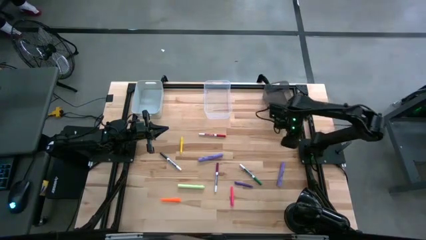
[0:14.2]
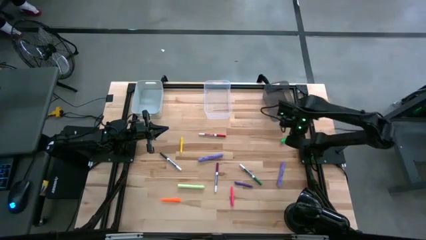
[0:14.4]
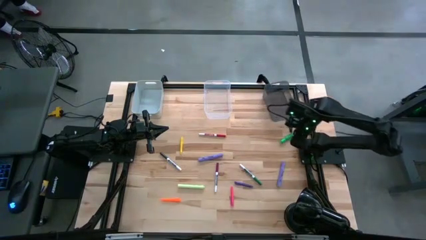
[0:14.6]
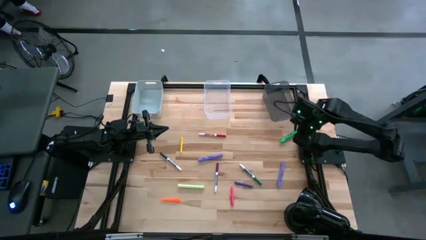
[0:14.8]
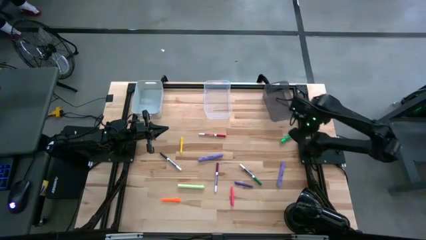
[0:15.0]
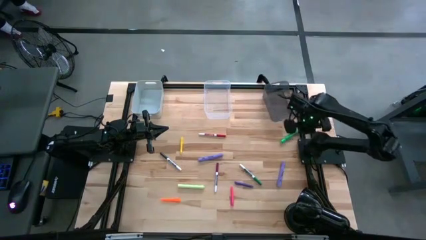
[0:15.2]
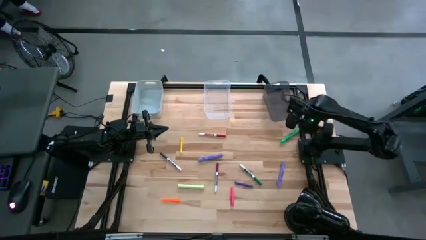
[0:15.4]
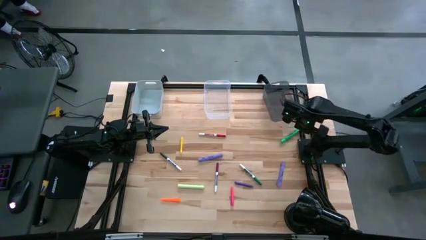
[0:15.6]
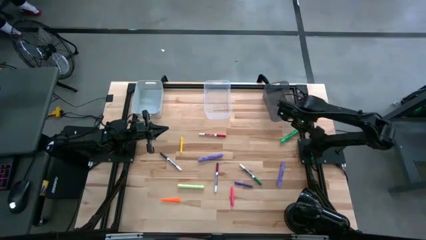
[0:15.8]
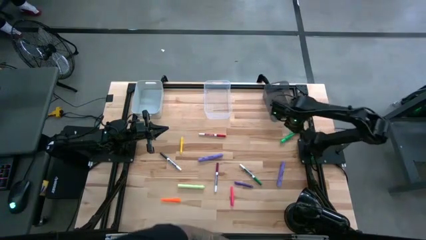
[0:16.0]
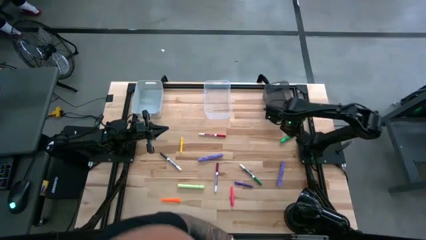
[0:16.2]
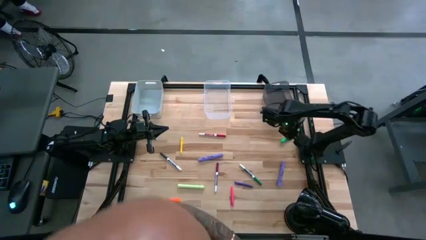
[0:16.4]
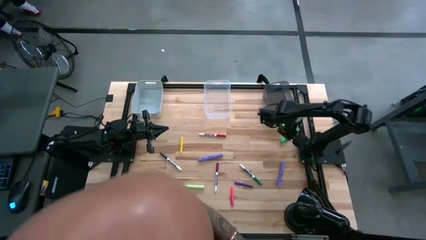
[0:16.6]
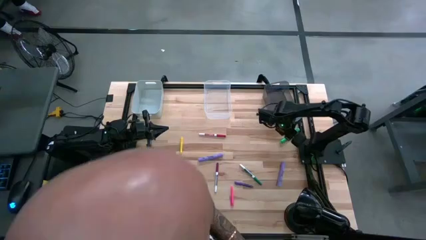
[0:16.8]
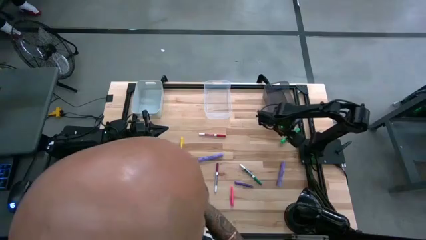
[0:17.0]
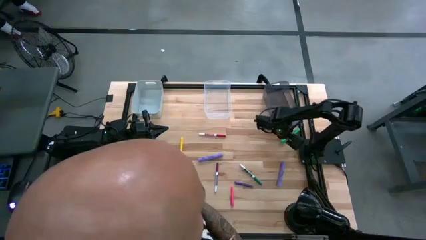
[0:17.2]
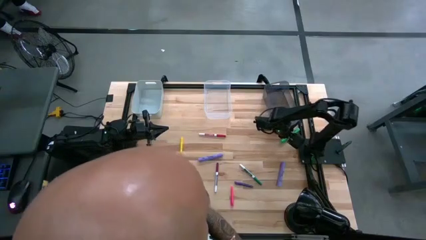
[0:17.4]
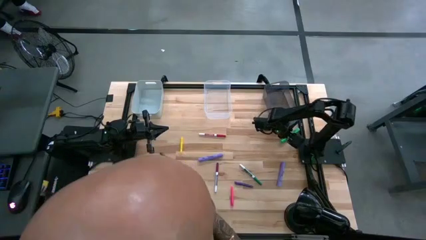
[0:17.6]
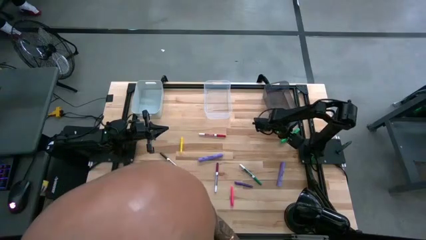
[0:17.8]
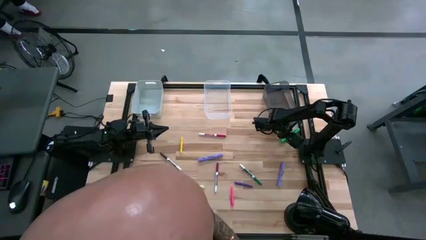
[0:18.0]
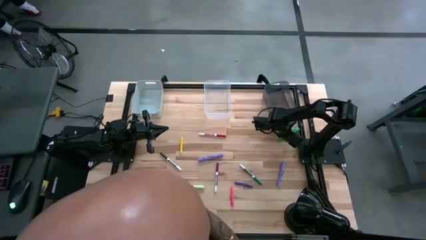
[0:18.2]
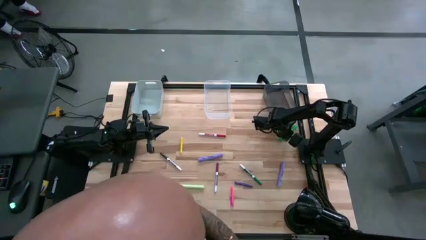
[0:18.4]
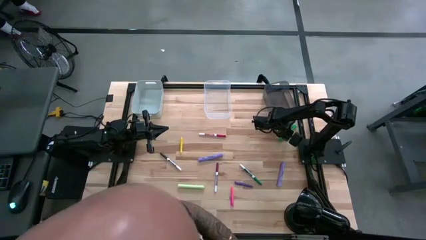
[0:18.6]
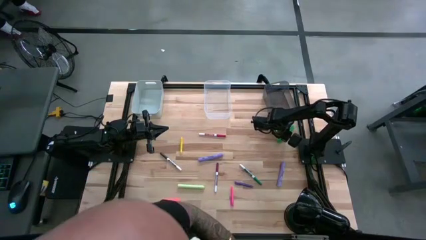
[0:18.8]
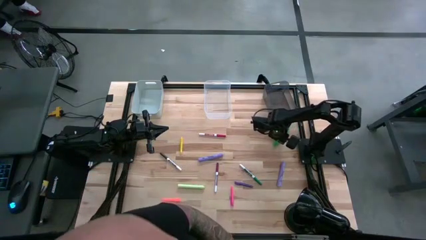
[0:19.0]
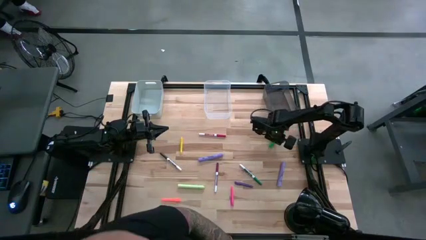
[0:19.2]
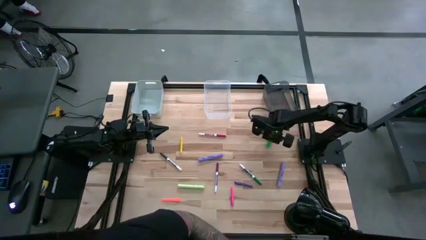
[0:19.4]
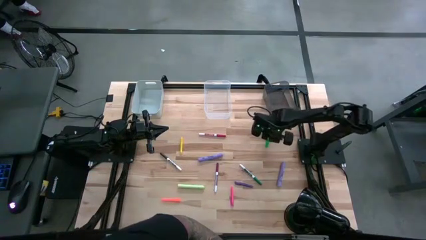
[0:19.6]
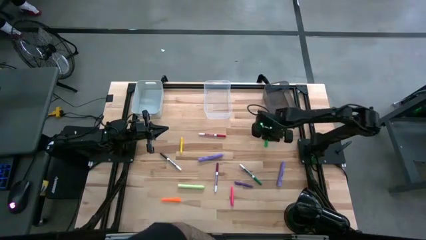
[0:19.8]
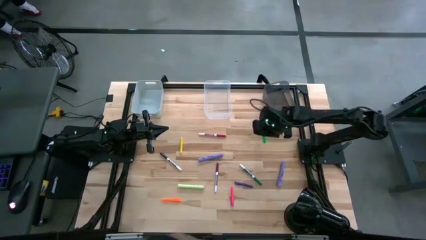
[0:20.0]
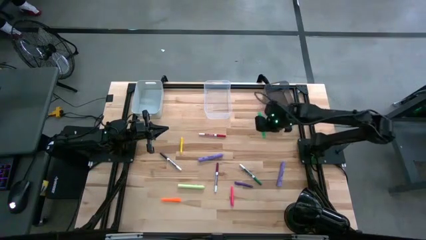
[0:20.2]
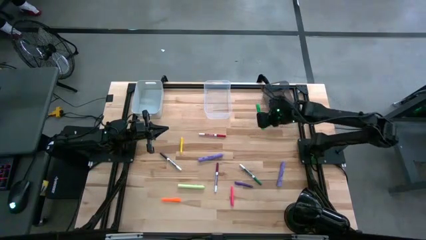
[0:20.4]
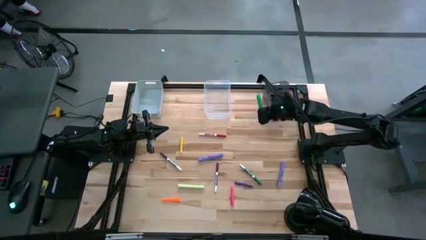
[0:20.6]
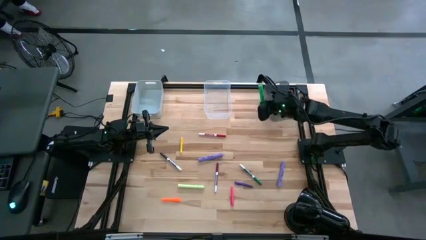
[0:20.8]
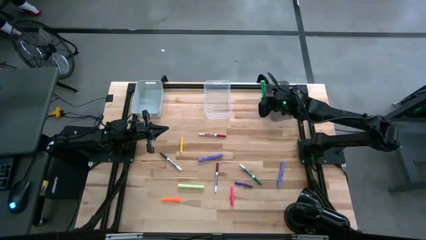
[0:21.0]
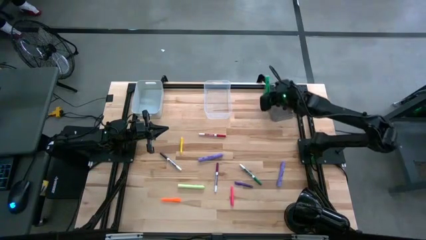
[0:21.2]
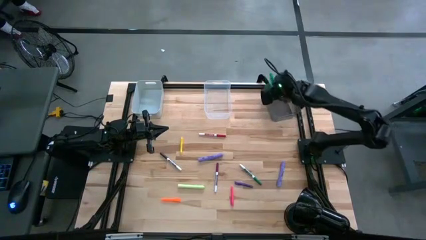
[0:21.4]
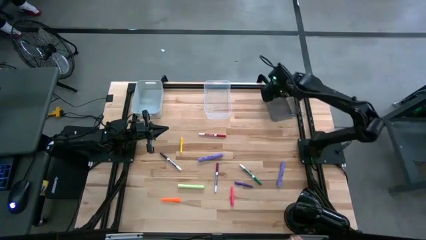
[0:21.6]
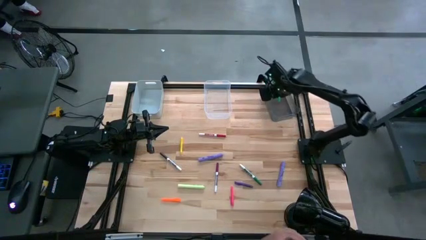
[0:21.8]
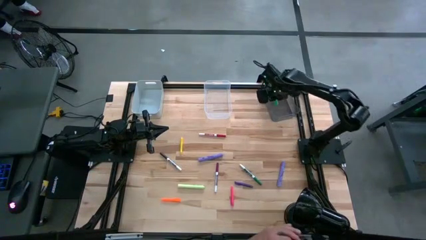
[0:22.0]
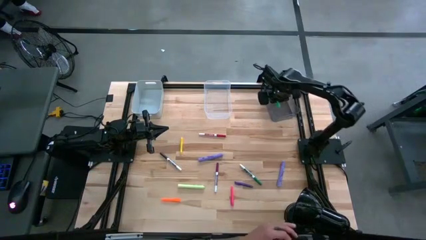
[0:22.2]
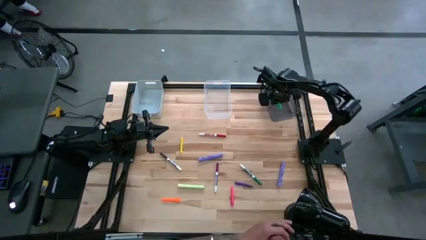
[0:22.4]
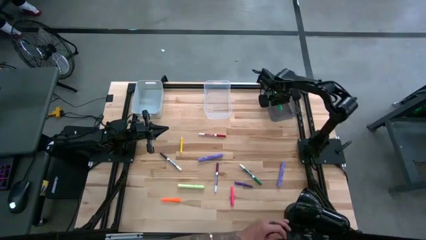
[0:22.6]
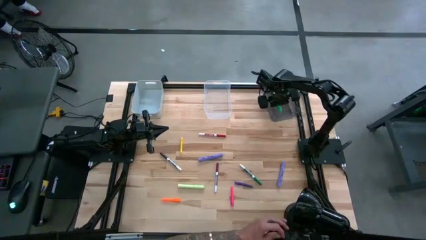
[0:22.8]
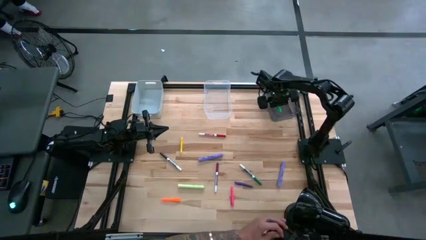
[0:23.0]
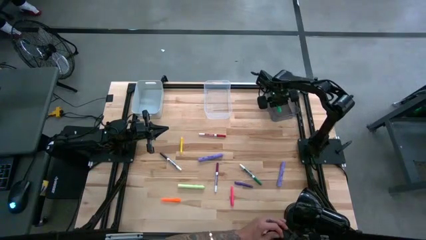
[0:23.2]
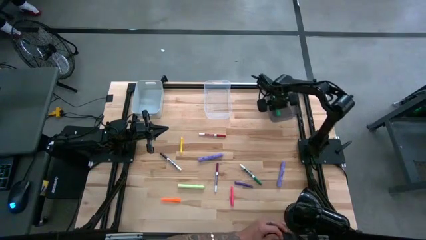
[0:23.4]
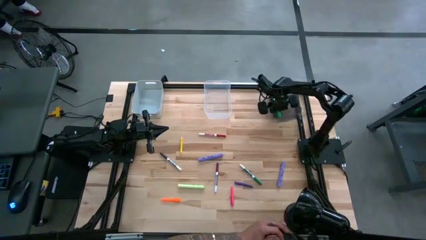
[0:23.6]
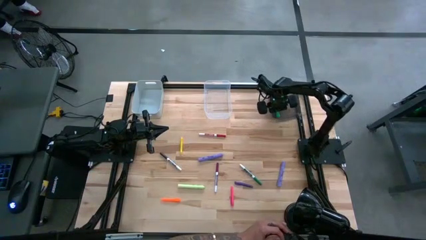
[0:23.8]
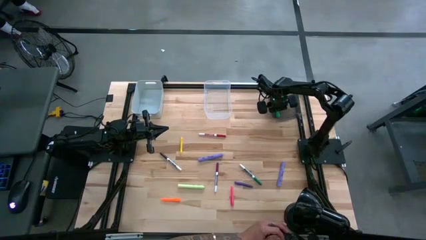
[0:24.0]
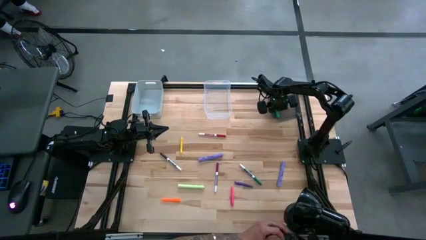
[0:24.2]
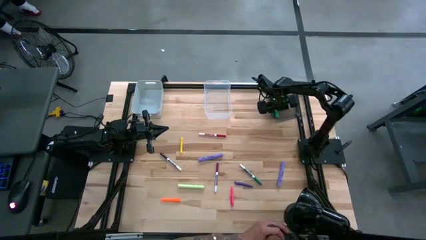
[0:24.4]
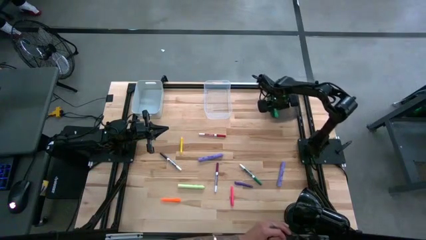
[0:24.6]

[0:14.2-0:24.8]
Task: Pick & Place Markers
Put the green highlighter pen into the black bin
